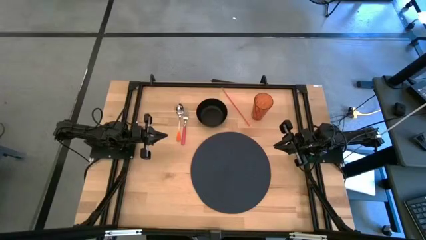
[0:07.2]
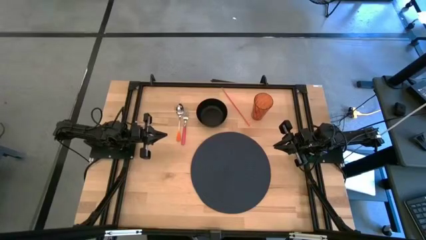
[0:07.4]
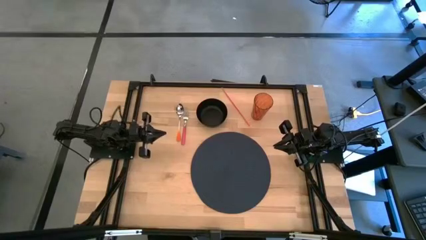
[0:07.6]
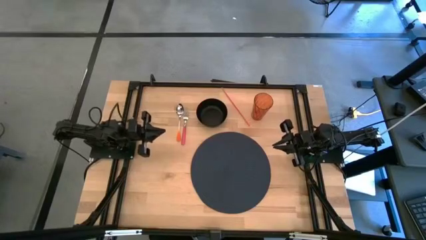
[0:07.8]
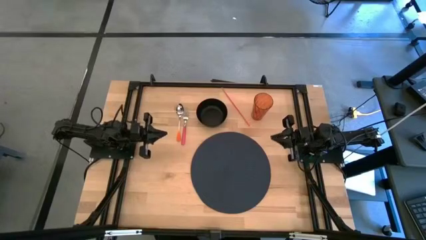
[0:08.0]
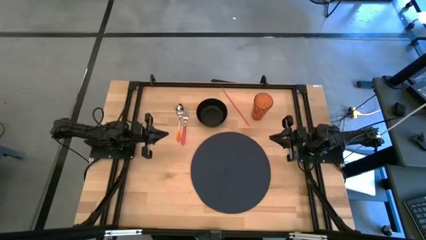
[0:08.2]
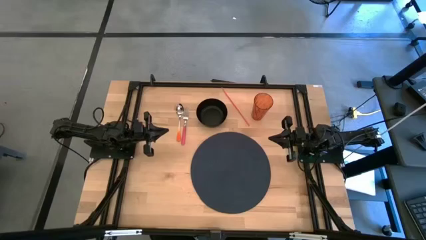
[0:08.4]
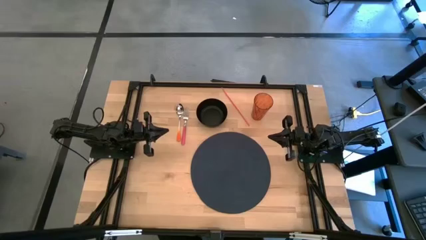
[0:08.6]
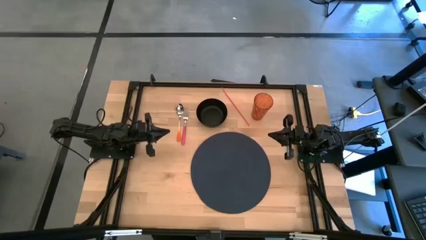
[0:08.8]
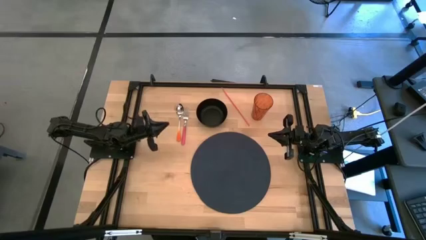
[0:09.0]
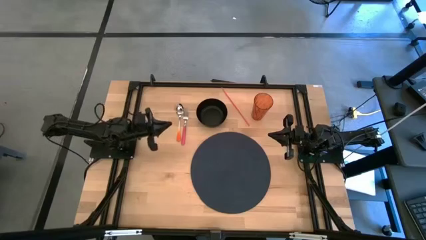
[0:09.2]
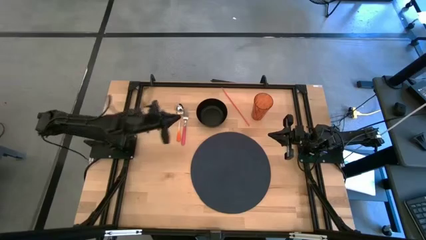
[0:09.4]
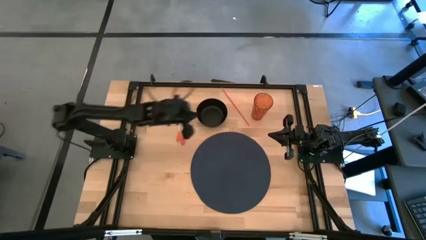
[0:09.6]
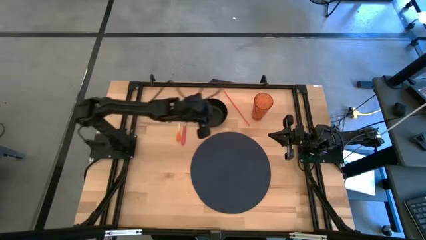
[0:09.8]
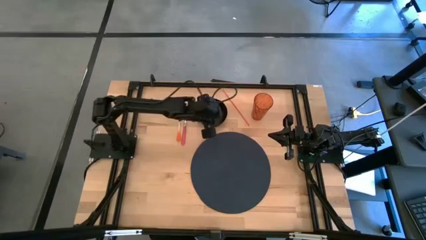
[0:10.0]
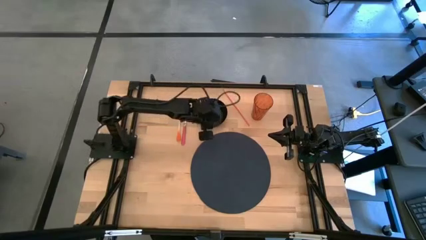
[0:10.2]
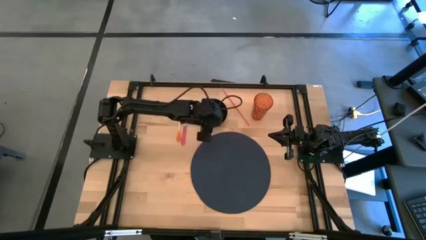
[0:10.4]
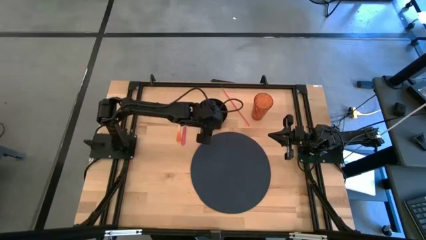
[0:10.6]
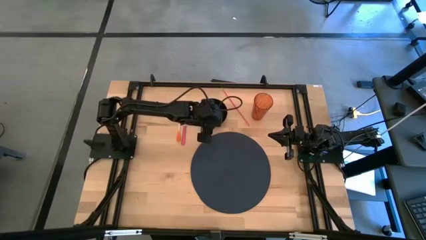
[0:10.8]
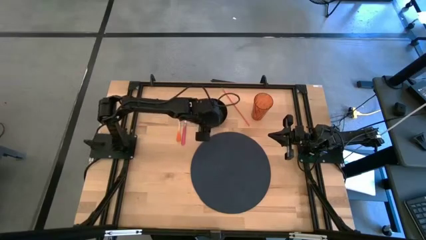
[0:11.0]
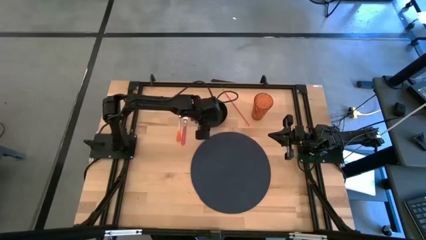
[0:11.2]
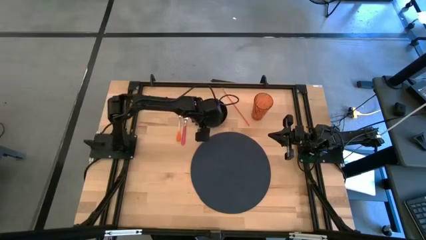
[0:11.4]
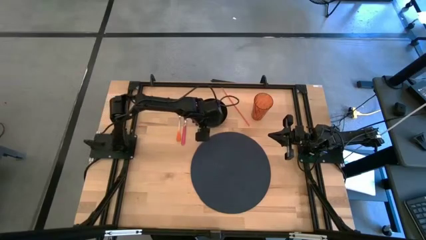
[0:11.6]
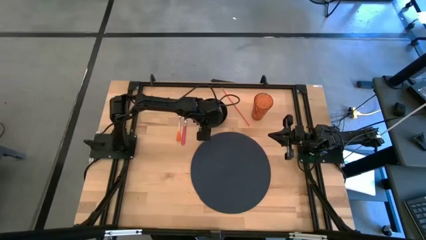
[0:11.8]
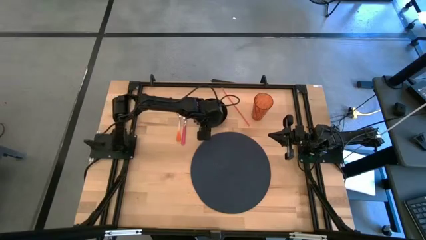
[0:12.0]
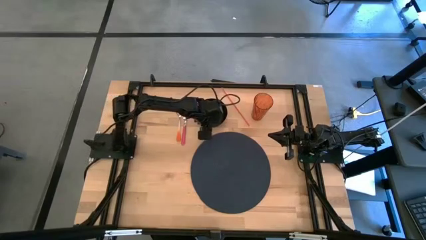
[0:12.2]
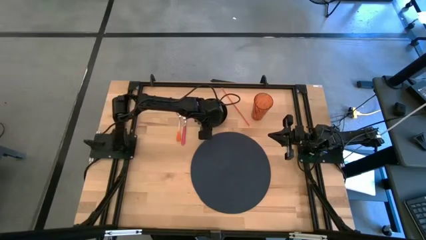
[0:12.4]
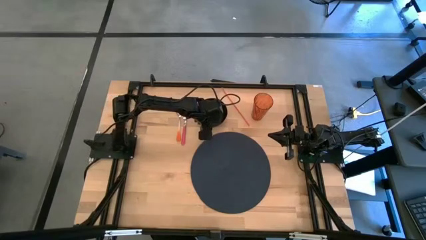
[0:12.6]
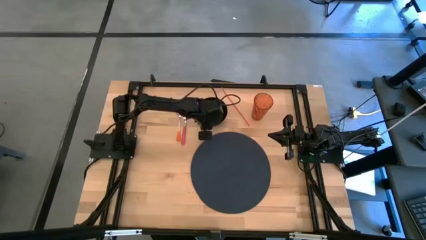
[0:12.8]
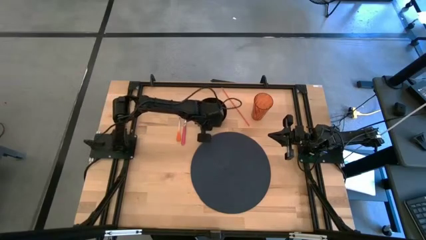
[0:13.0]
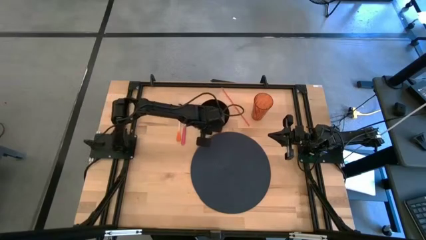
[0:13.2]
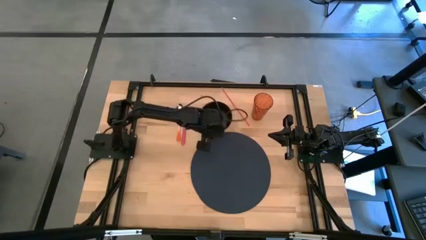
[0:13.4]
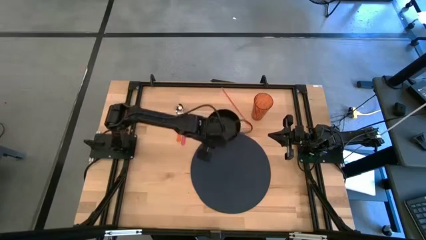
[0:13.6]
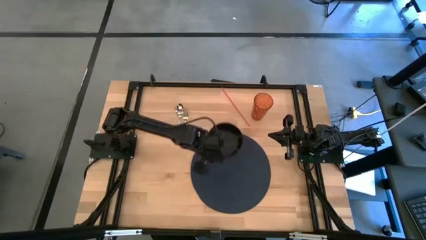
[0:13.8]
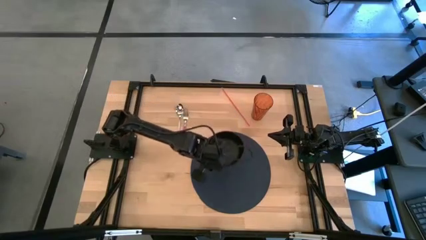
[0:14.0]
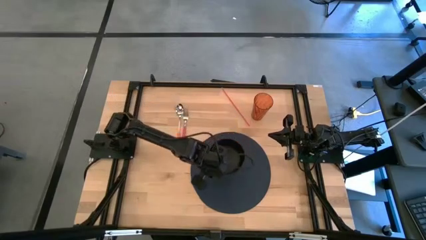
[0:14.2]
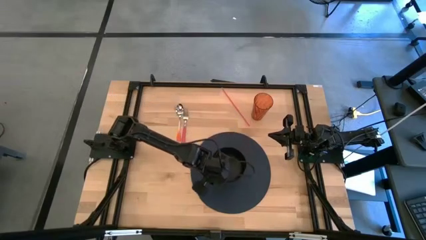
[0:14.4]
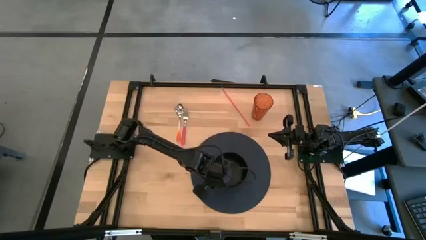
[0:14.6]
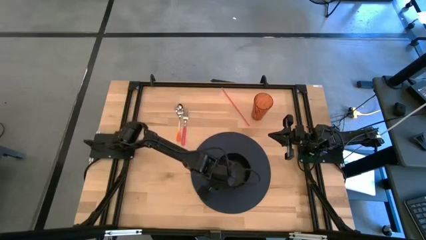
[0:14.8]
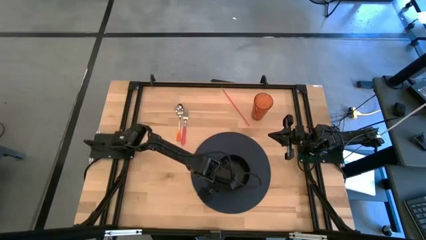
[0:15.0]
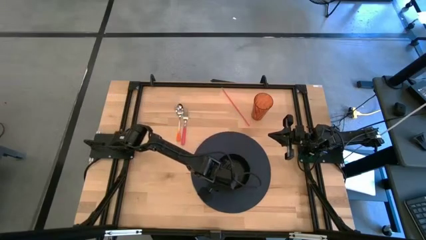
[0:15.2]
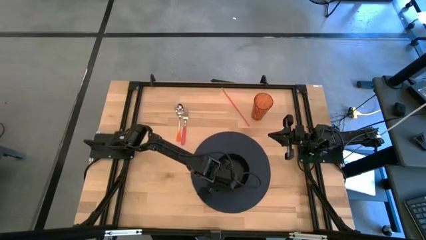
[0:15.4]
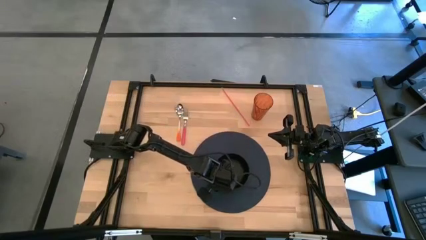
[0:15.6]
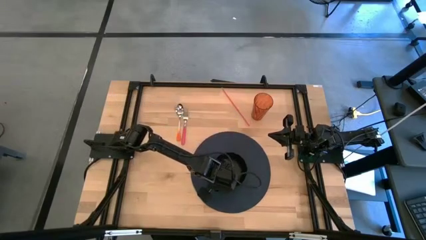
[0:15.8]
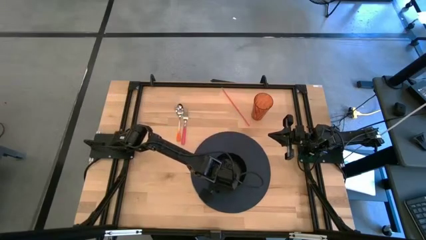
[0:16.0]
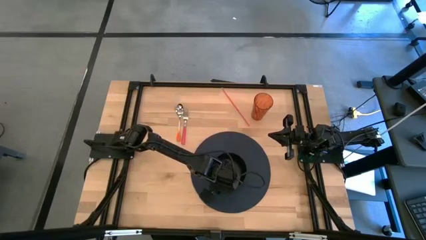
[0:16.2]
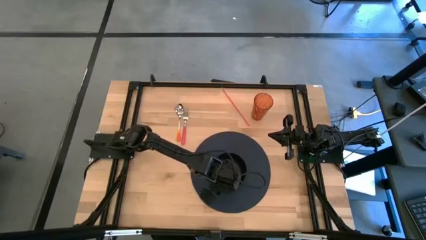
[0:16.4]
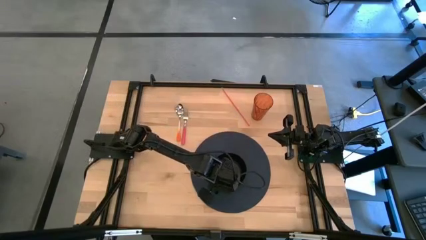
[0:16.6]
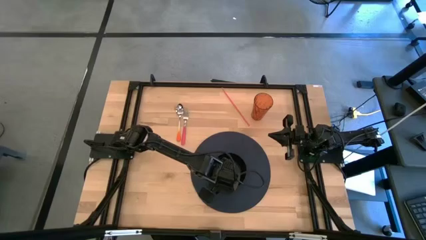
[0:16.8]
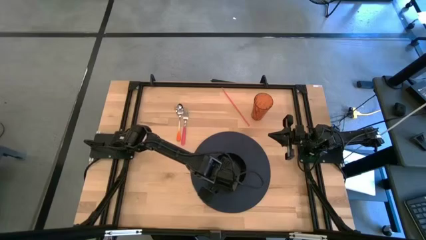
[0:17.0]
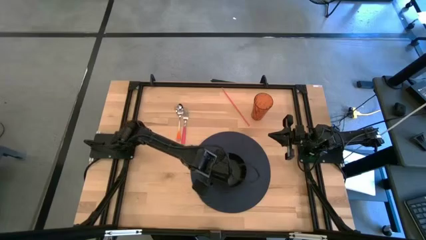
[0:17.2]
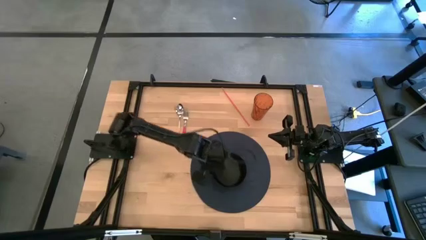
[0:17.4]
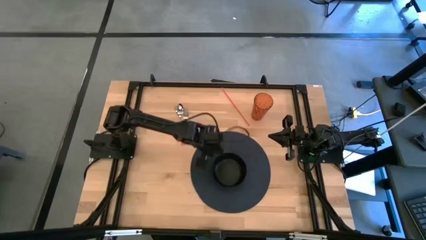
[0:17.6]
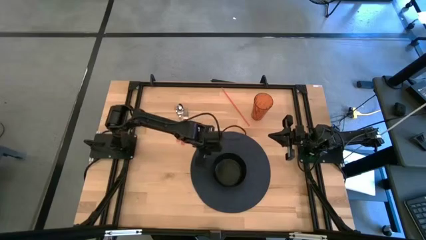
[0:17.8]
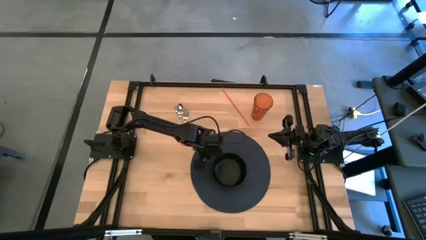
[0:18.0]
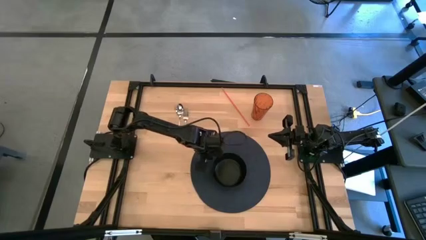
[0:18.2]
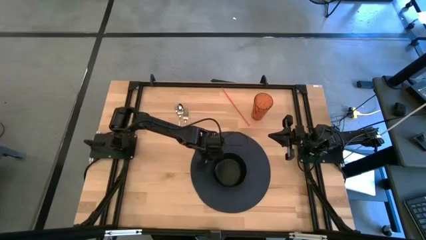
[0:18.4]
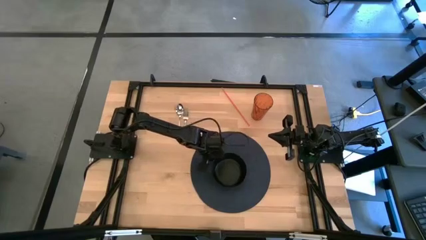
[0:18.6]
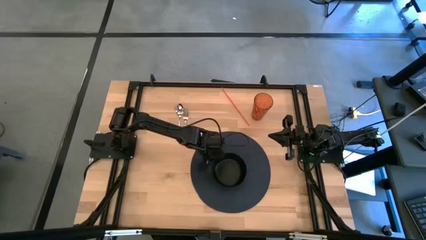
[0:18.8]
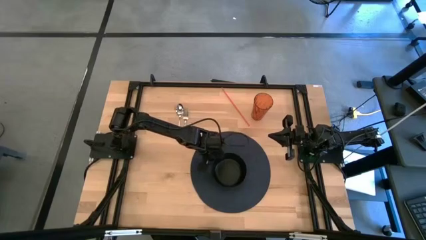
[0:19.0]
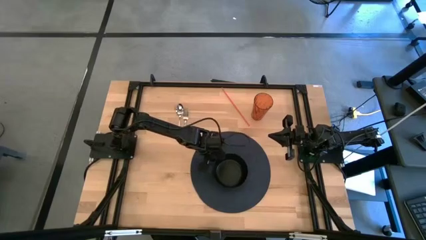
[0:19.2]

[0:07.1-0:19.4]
Task: Pick & Place Utensil
Put the black bowl on the blue mat

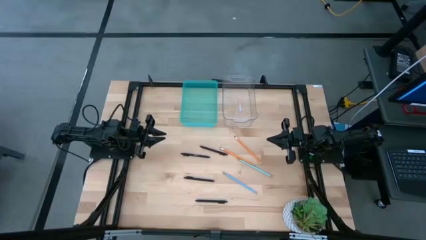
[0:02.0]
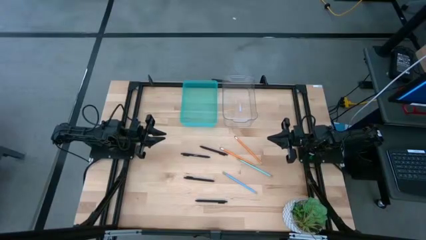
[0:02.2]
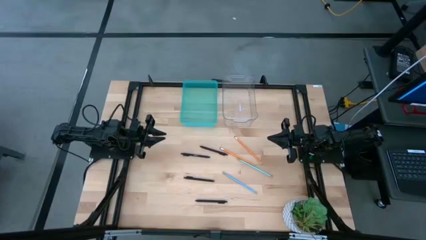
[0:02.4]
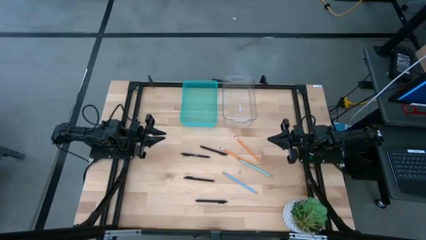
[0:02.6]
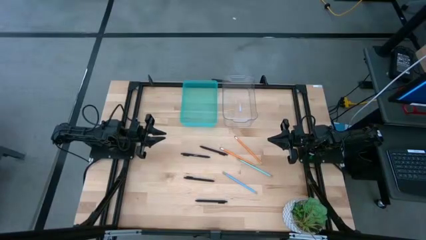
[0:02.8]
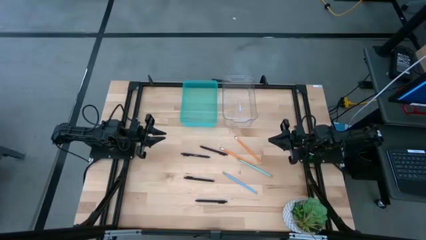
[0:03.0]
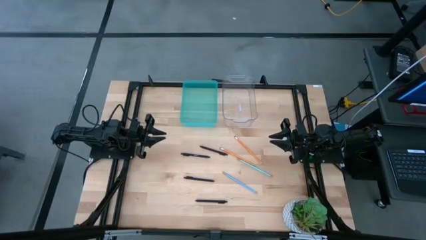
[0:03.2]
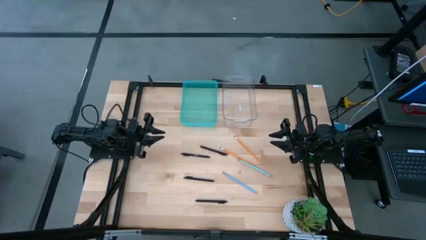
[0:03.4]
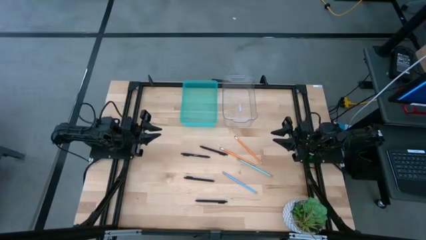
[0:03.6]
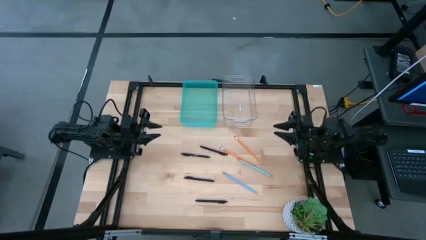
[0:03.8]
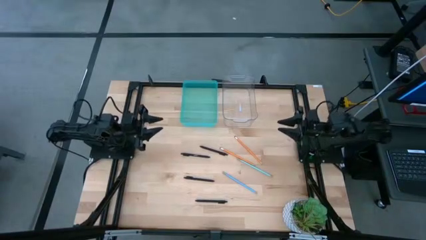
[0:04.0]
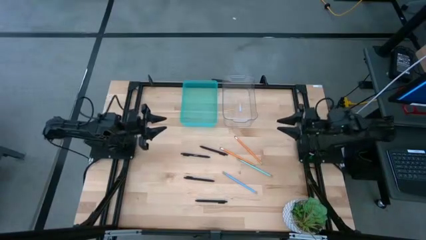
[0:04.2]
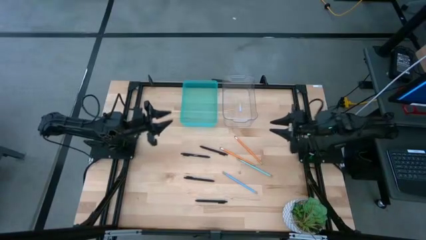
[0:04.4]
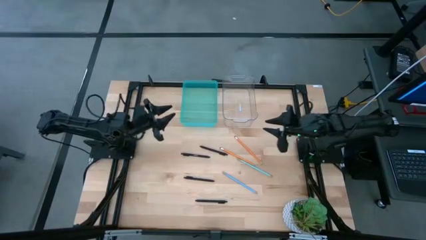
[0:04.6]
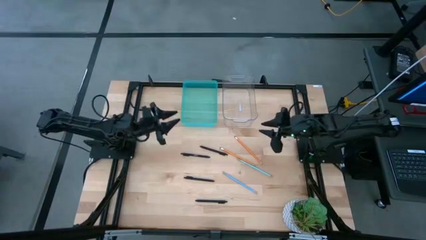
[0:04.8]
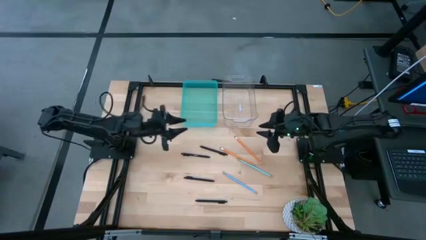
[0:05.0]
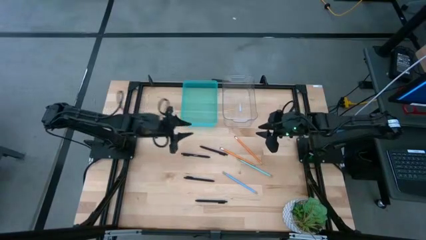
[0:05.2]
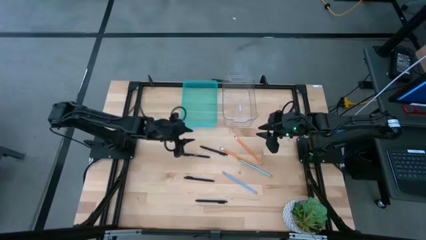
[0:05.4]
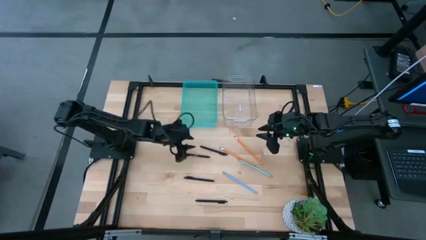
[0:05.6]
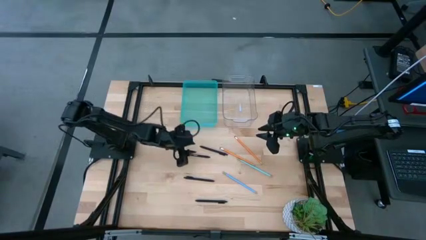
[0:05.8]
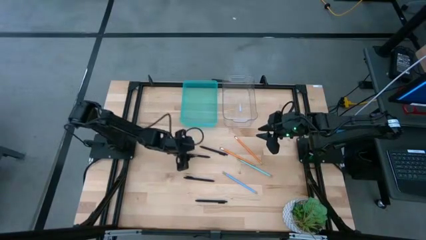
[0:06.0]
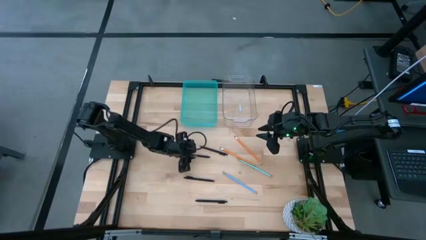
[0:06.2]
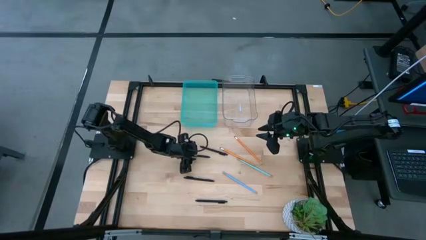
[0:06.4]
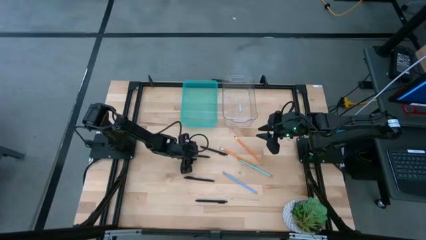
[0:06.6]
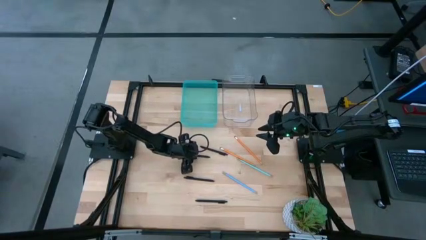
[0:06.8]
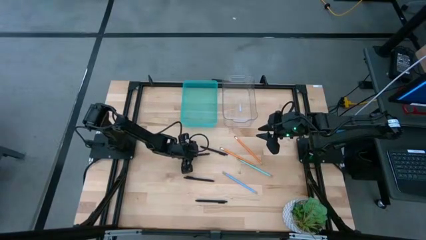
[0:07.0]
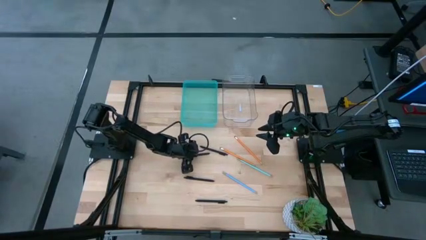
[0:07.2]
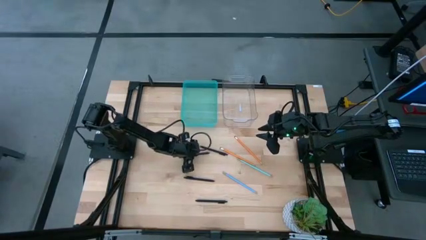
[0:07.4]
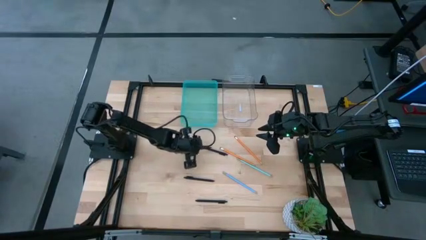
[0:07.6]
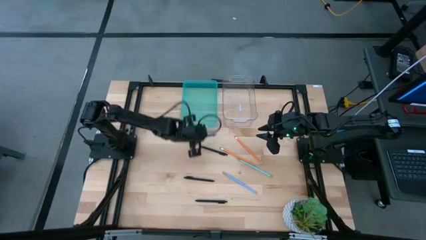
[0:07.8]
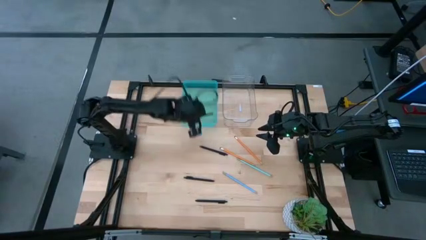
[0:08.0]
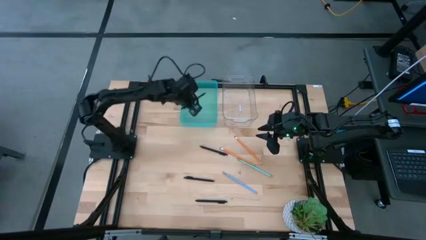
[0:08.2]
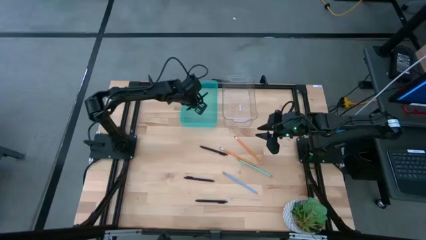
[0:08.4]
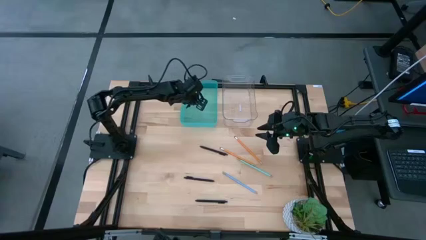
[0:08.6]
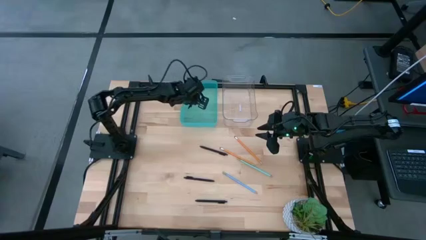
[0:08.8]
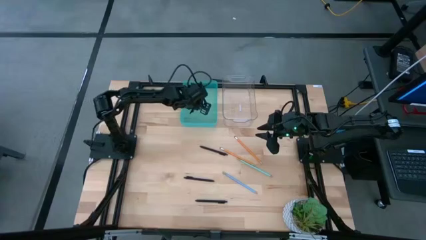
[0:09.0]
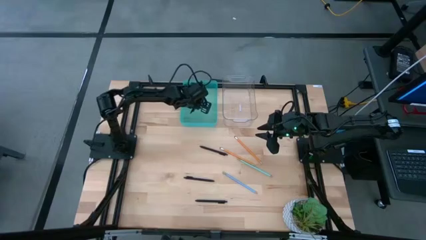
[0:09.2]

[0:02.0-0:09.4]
Task: Sort pens & pencils
Put the second highest black pen into the light blue bin
